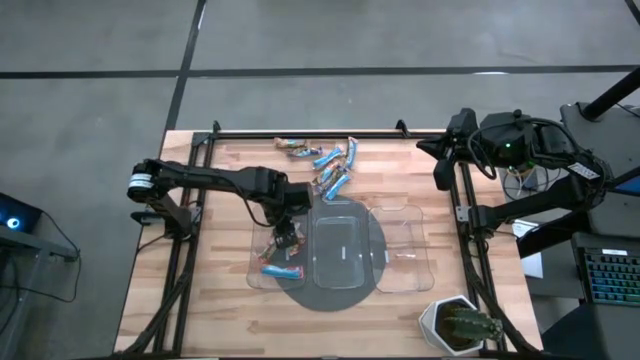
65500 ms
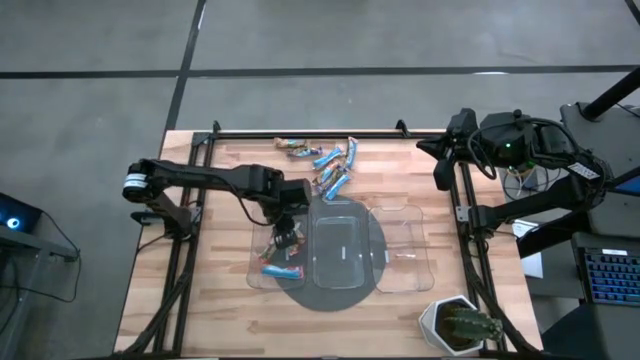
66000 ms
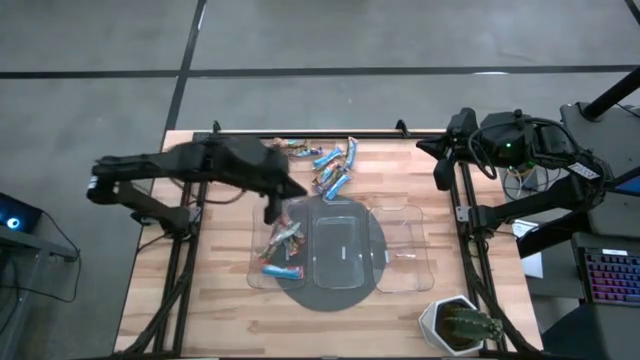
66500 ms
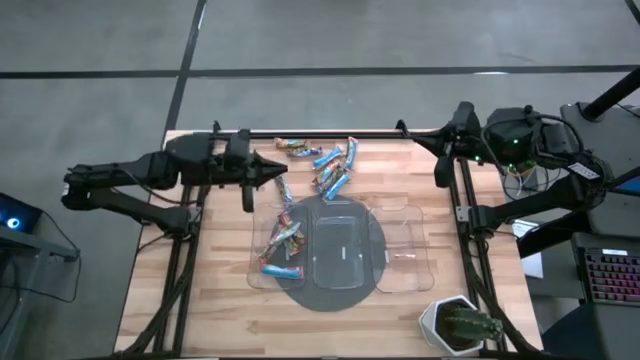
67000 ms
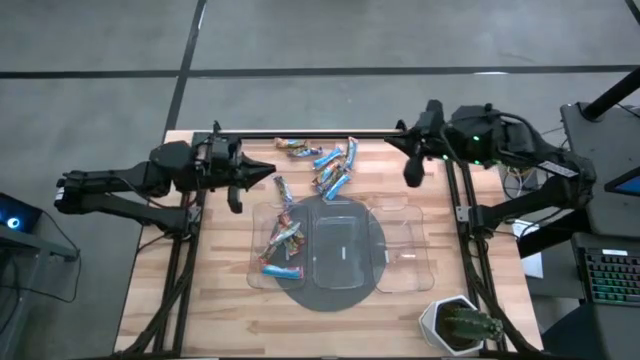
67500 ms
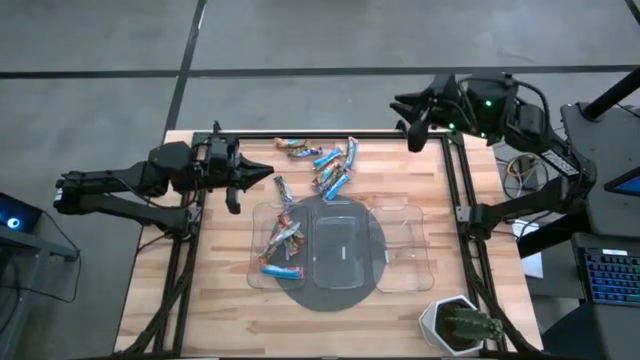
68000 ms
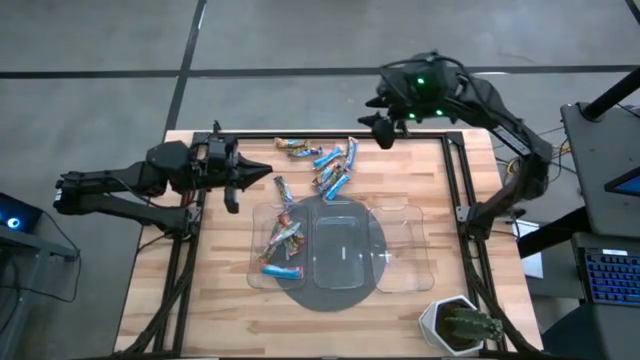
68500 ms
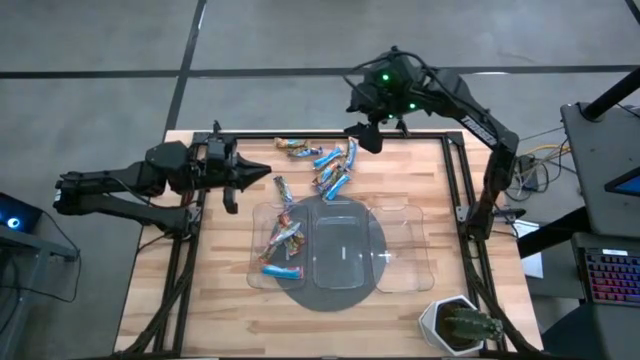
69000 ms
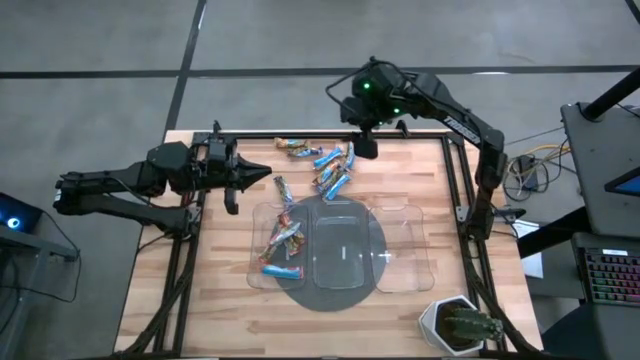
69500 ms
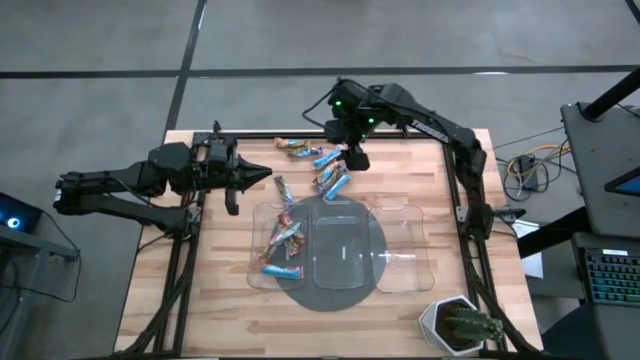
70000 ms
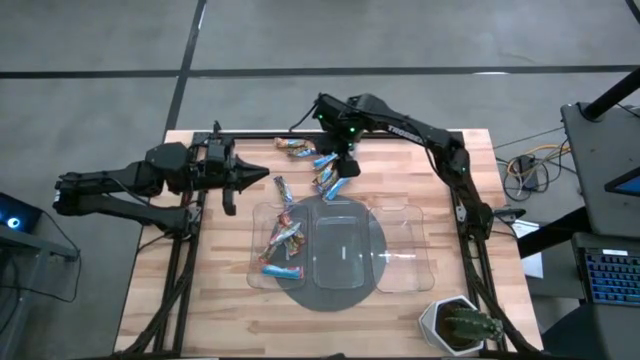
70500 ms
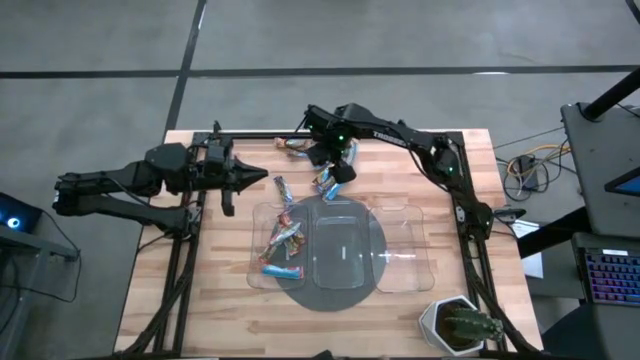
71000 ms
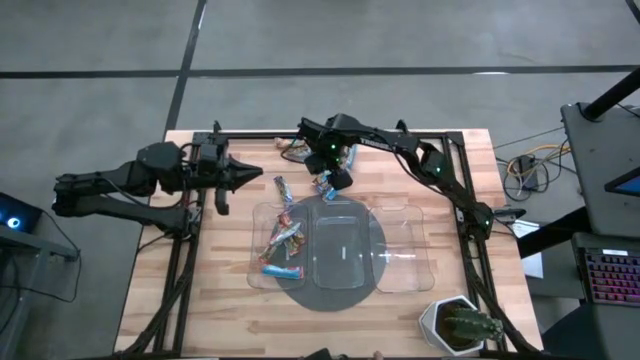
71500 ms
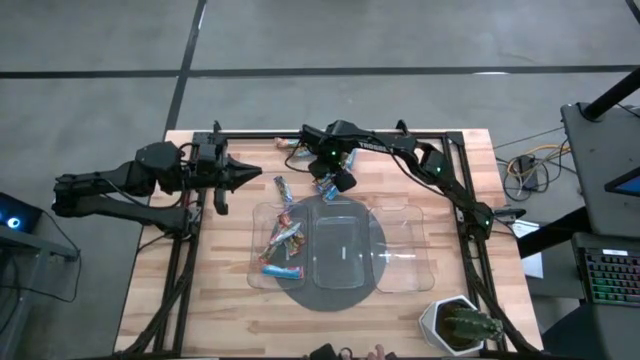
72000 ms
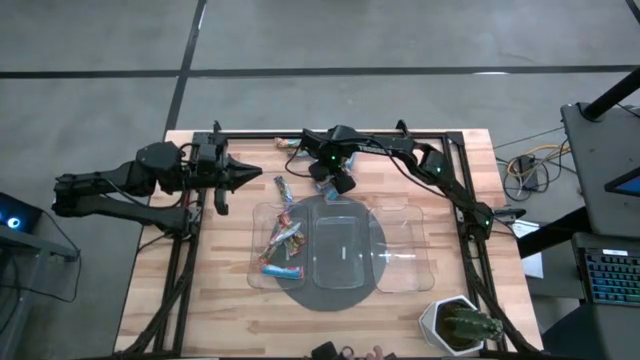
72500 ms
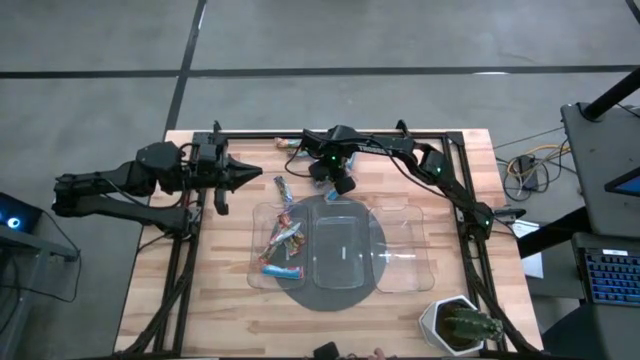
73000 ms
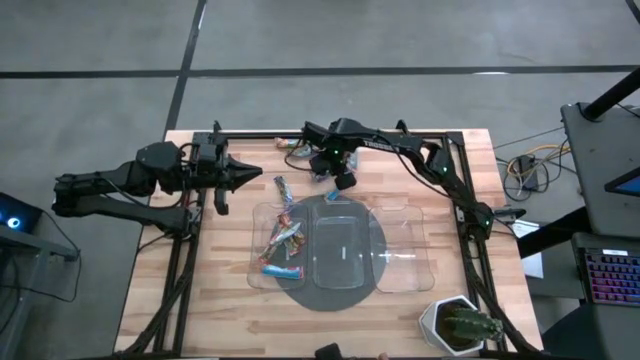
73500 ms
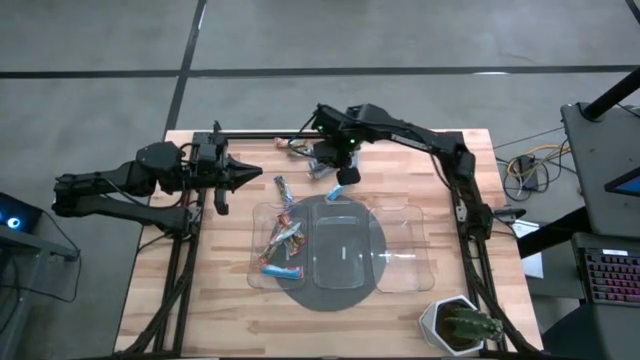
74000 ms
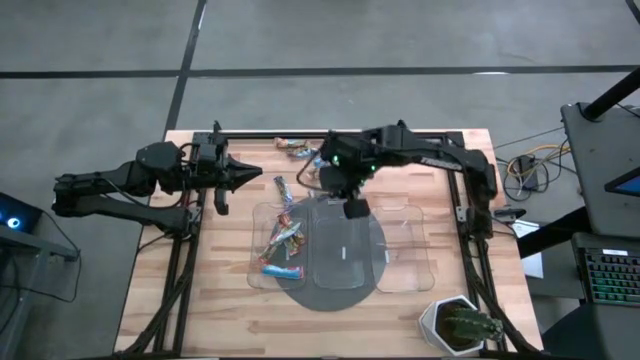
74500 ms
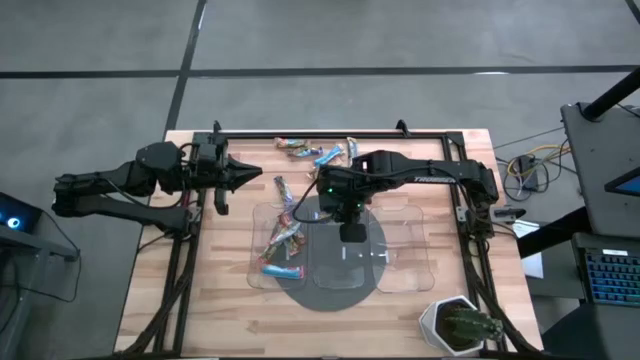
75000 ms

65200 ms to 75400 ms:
Task: Pick and place Granola Bars by type
Put the blue granola bar into the middle transparent bin

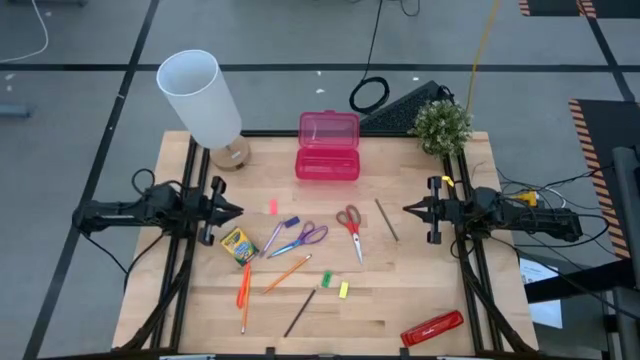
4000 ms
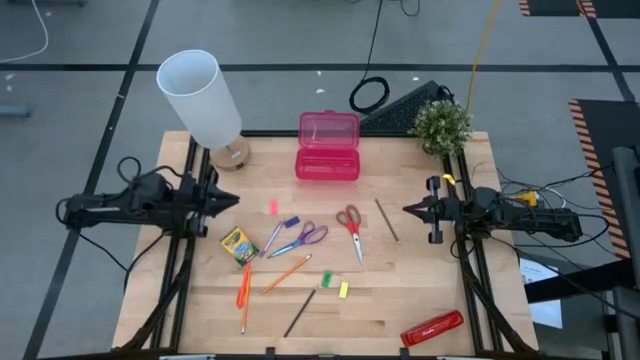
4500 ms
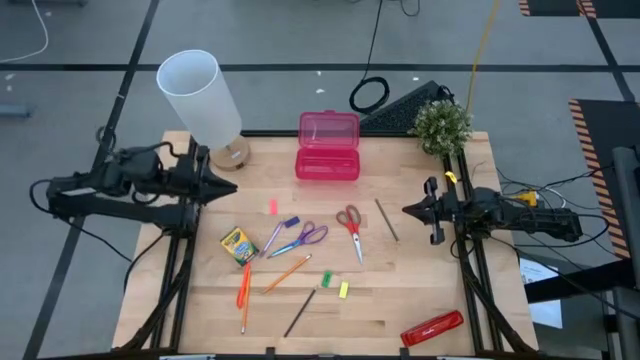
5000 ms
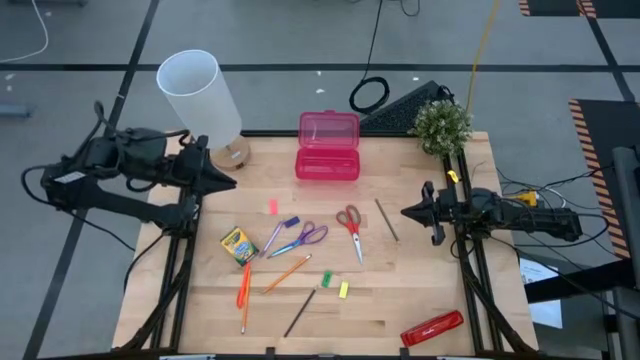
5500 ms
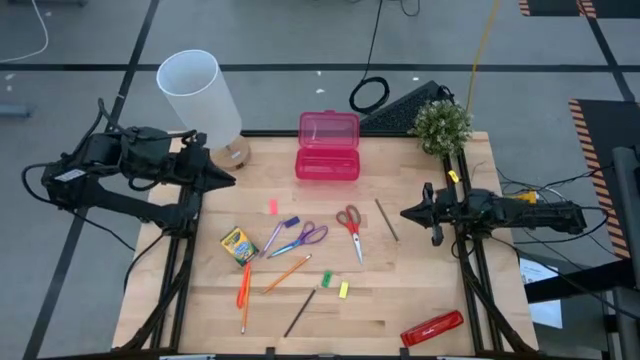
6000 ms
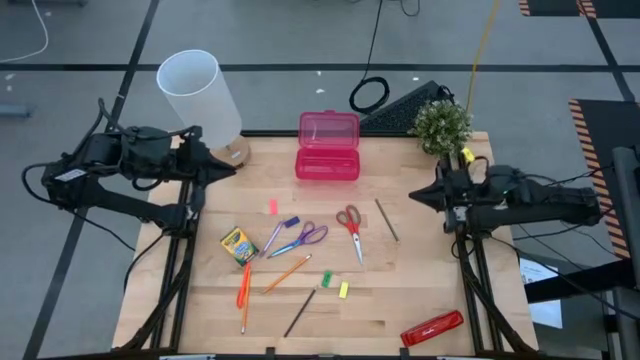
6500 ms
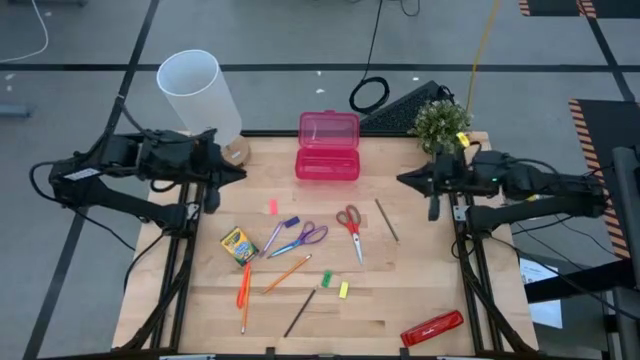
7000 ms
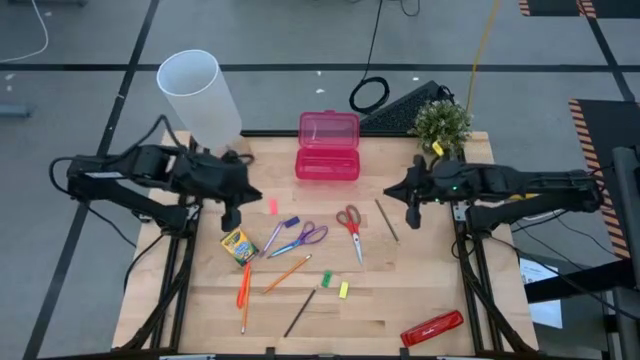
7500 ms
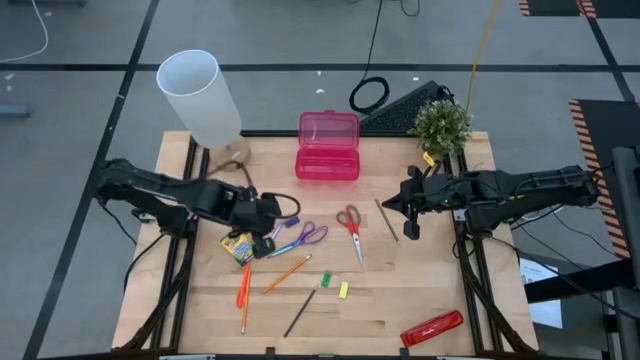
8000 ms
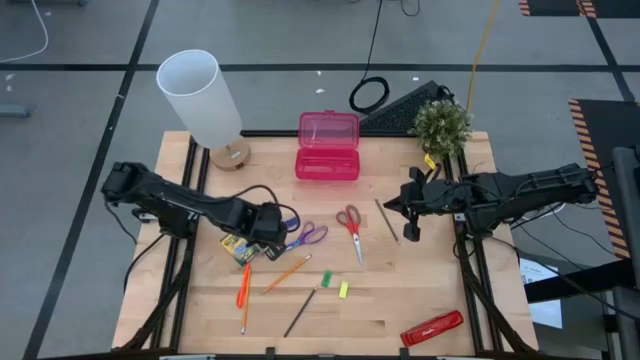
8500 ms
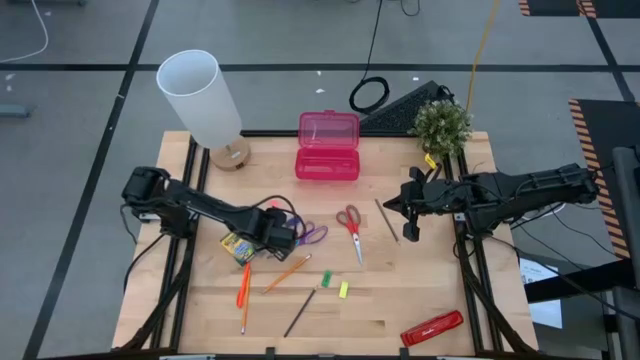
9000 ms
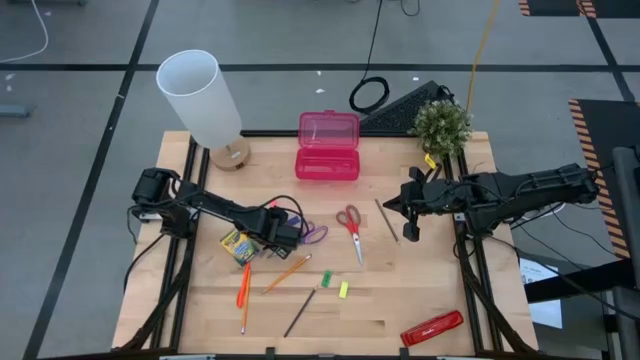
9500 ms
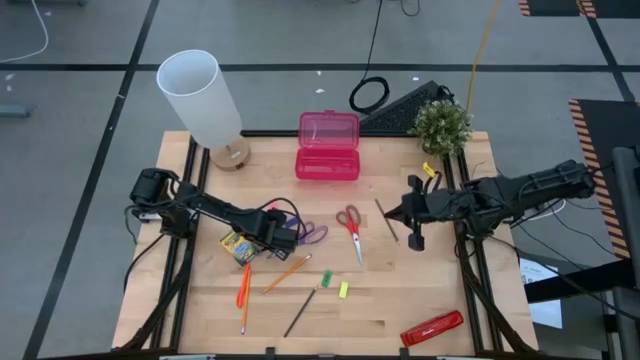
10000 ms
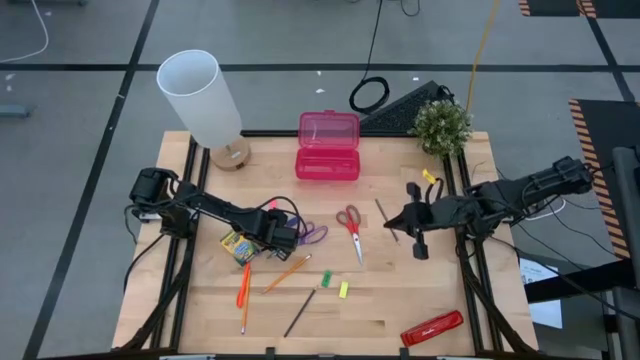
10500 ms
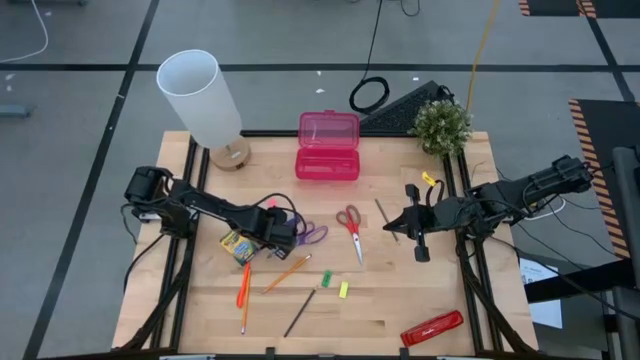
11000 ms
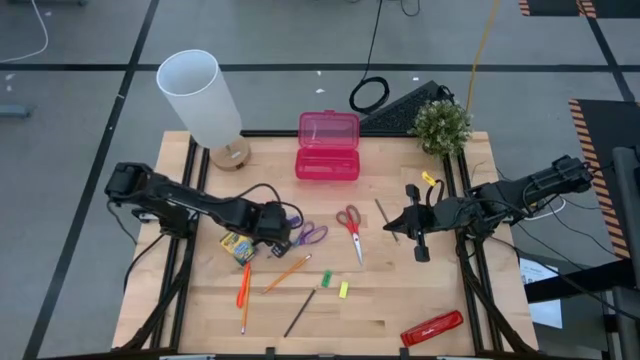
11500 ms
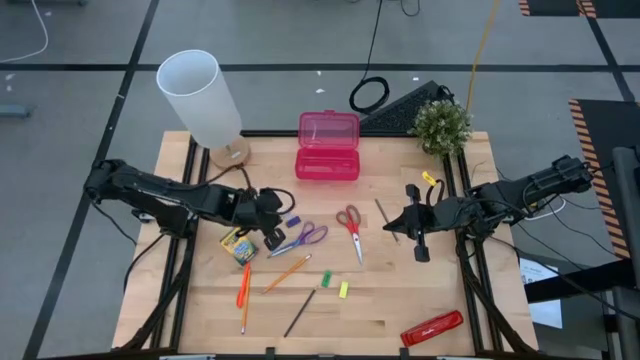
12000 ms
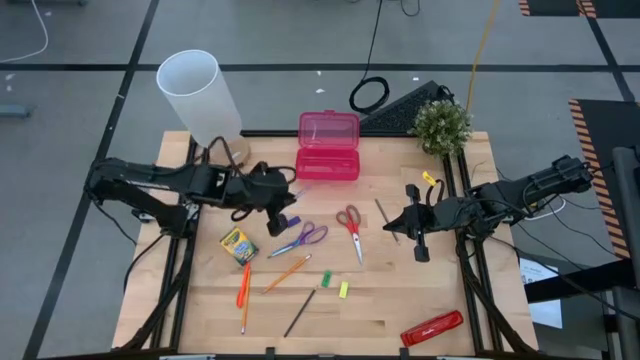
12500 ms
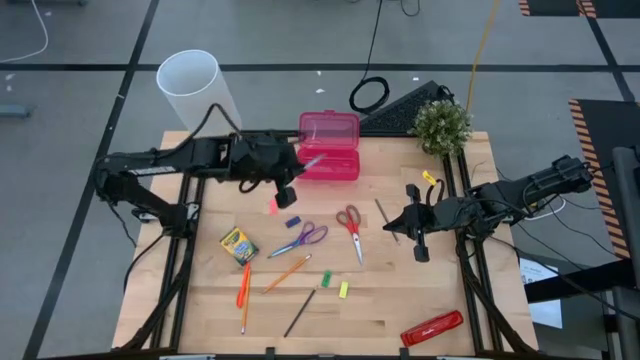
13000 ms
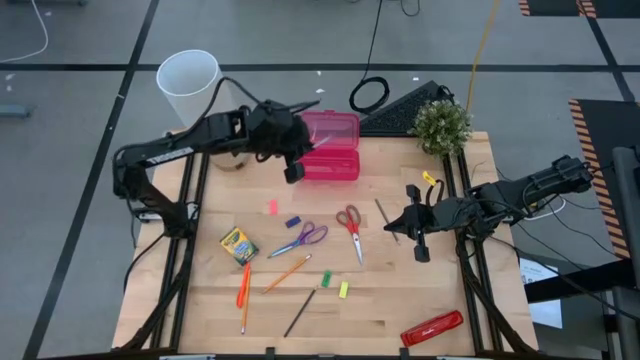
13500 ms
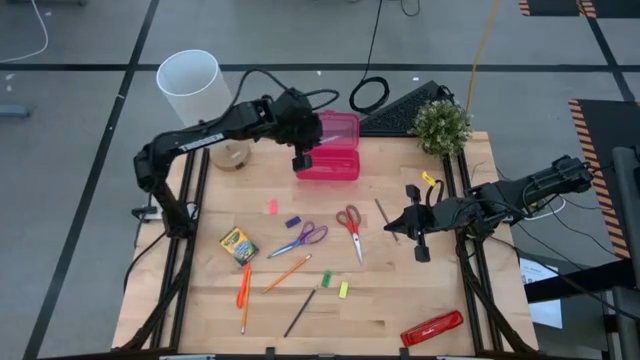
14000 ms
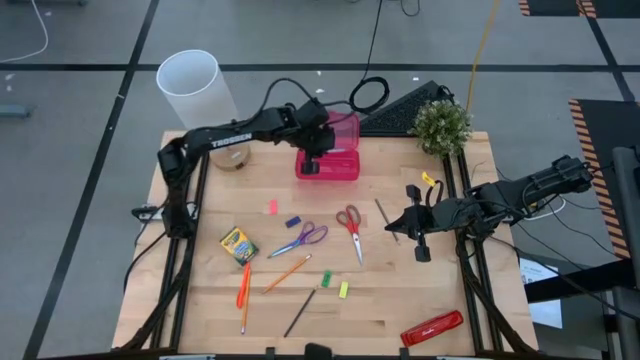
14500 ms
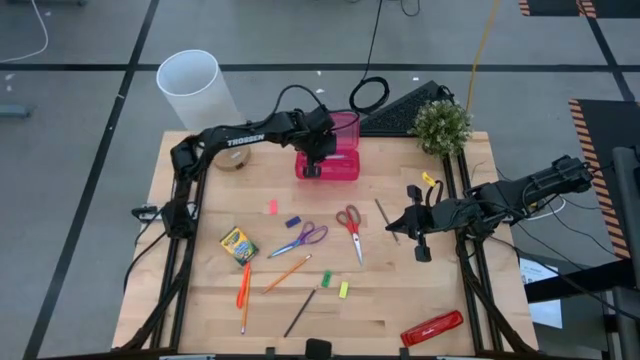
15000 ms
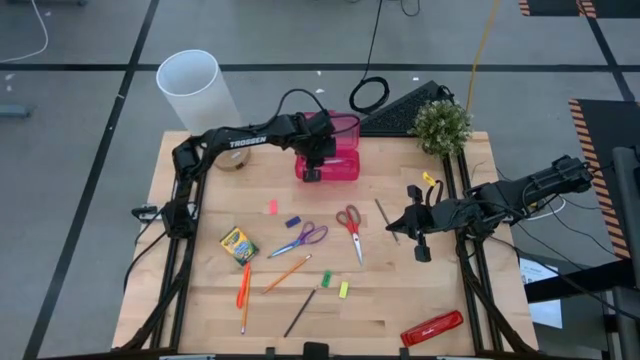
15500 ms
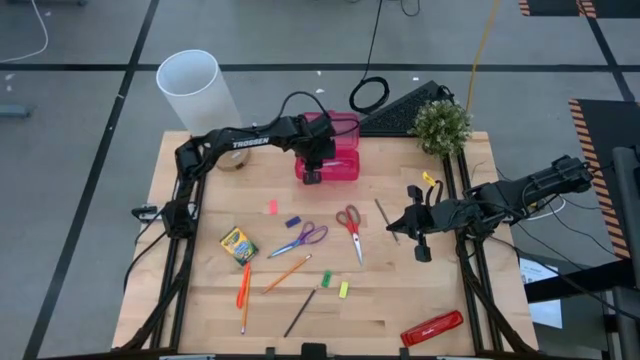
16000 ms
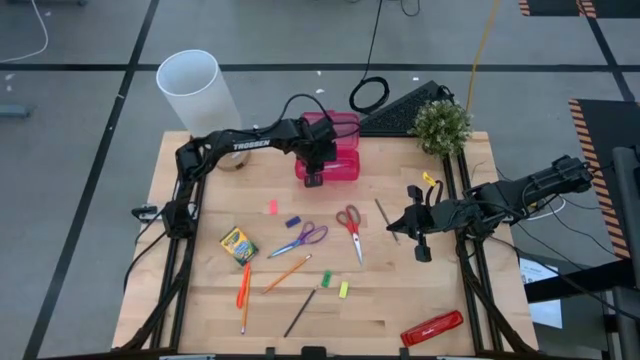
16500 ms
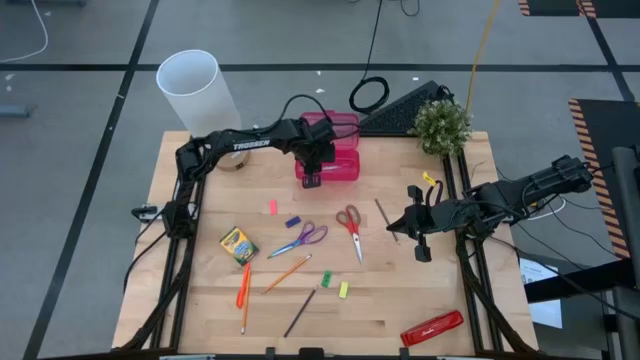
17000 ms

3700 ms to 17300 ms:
Task: Pack school essentials
Put the violet pen into the red supply box
